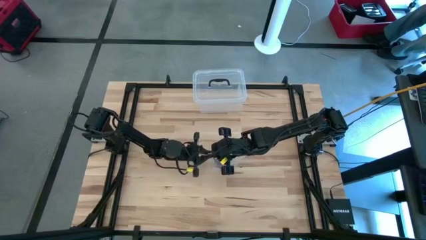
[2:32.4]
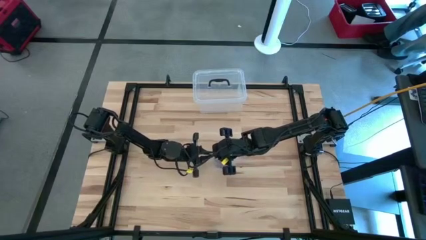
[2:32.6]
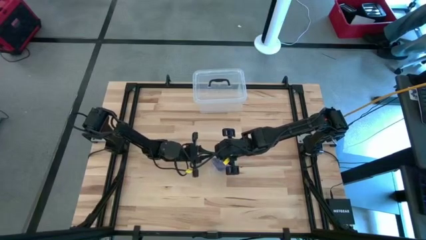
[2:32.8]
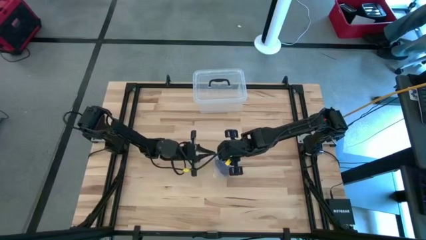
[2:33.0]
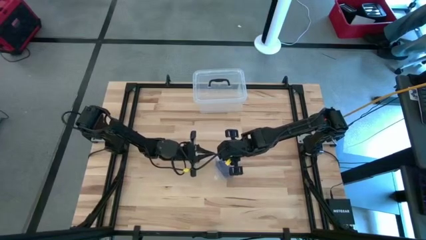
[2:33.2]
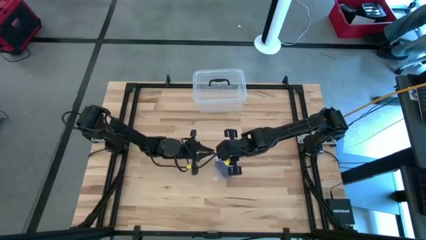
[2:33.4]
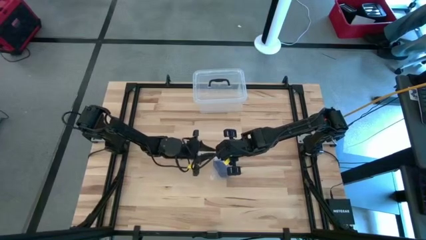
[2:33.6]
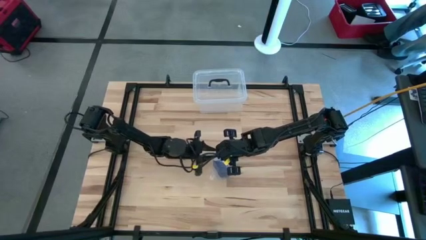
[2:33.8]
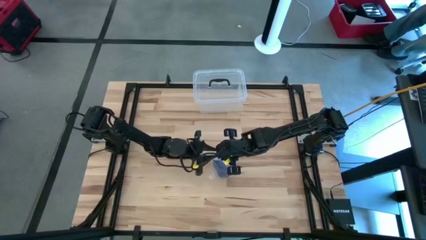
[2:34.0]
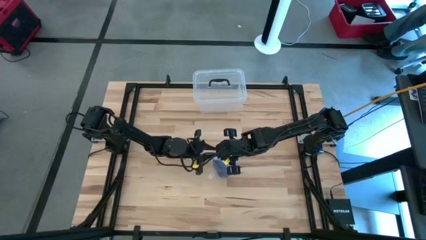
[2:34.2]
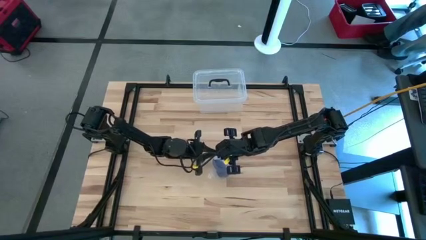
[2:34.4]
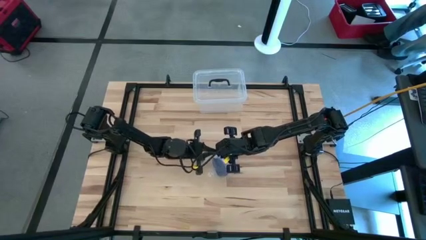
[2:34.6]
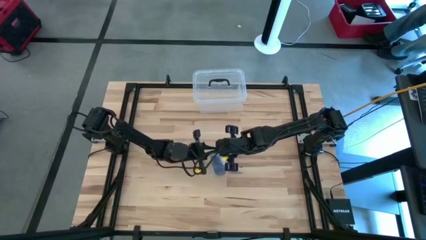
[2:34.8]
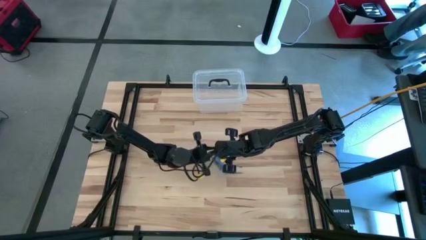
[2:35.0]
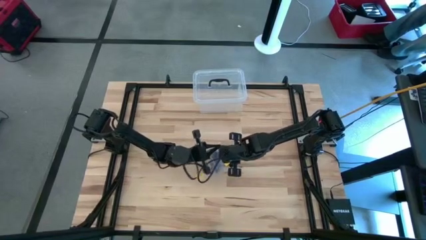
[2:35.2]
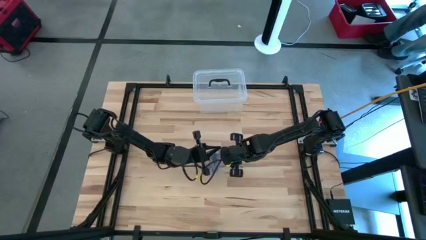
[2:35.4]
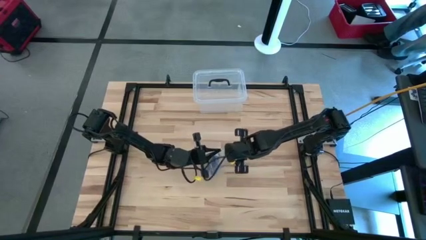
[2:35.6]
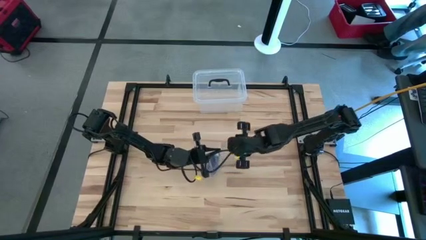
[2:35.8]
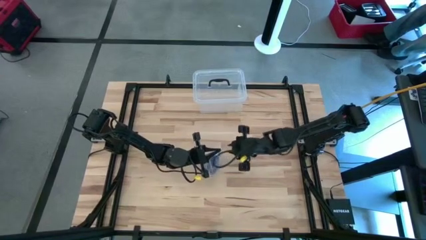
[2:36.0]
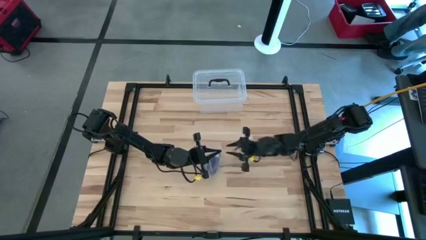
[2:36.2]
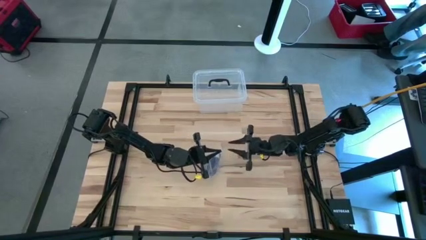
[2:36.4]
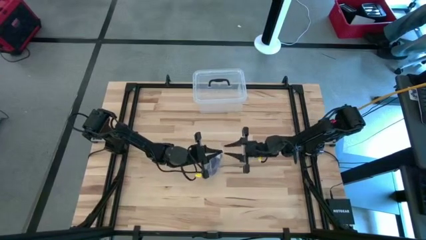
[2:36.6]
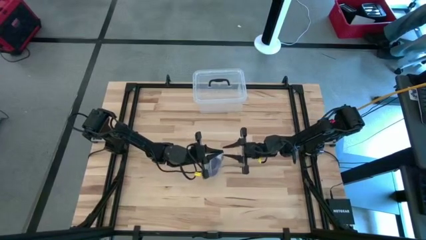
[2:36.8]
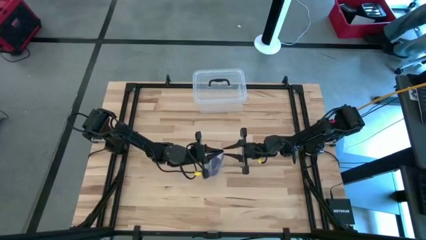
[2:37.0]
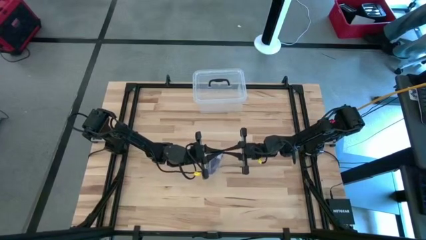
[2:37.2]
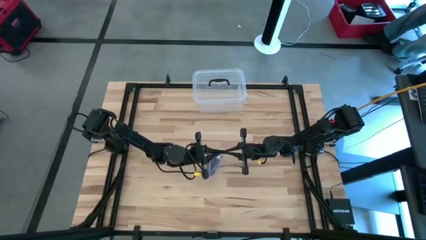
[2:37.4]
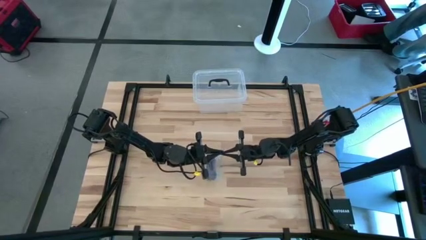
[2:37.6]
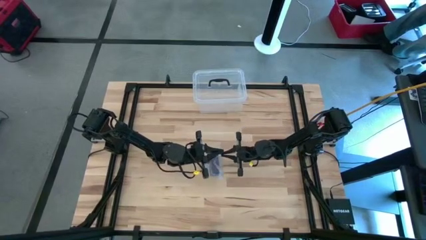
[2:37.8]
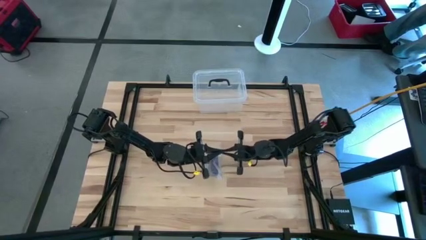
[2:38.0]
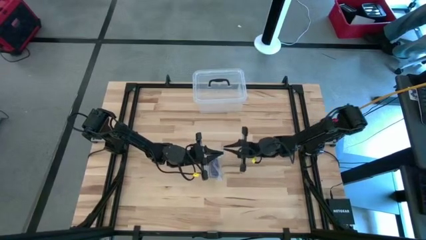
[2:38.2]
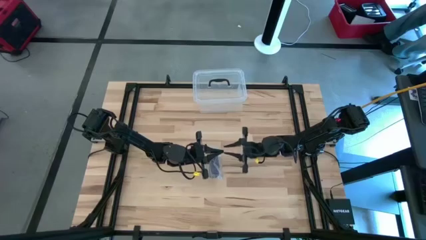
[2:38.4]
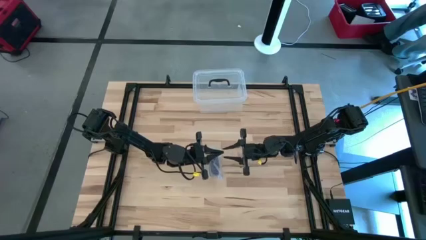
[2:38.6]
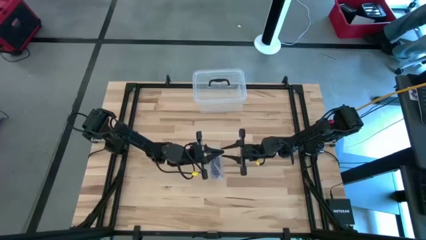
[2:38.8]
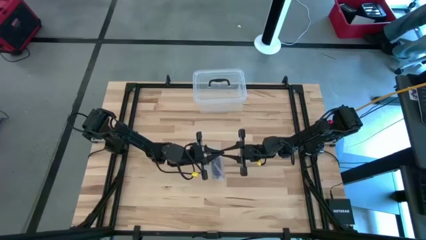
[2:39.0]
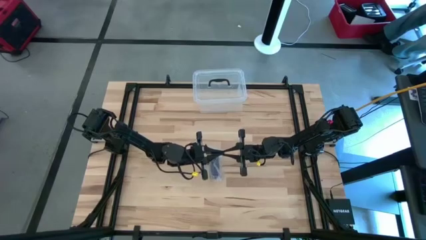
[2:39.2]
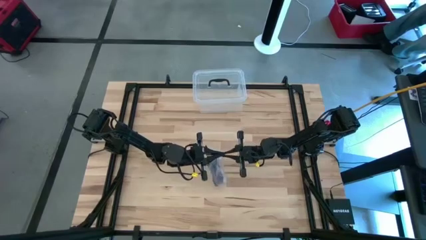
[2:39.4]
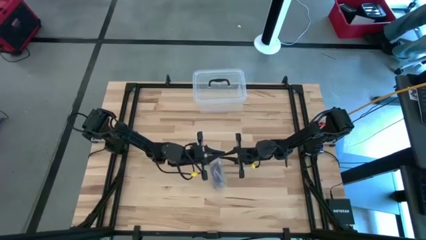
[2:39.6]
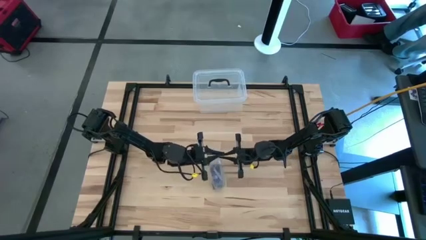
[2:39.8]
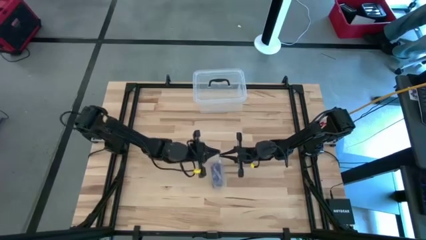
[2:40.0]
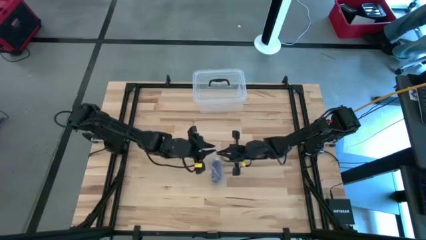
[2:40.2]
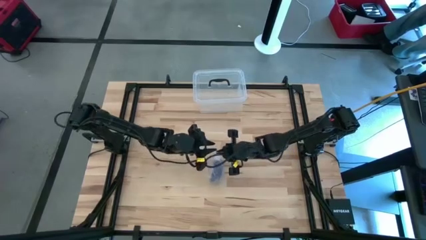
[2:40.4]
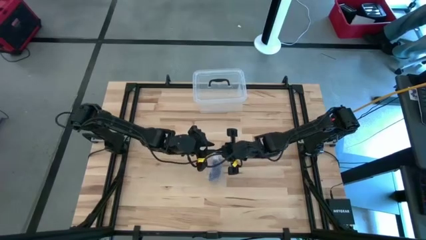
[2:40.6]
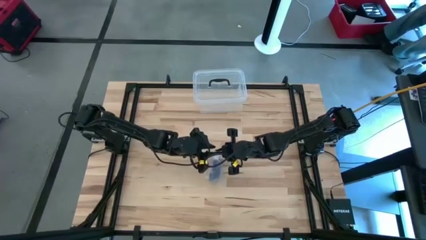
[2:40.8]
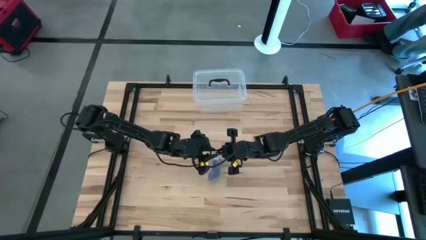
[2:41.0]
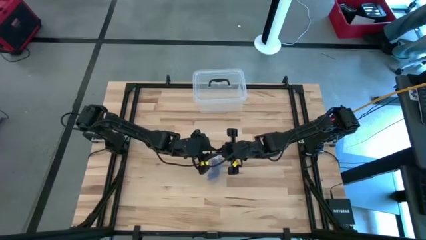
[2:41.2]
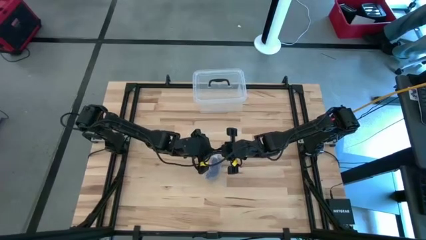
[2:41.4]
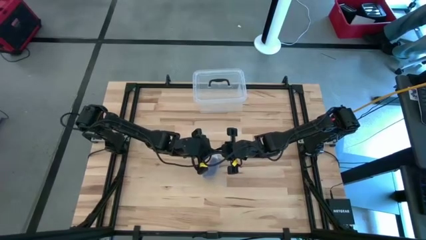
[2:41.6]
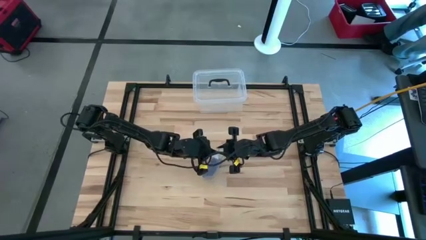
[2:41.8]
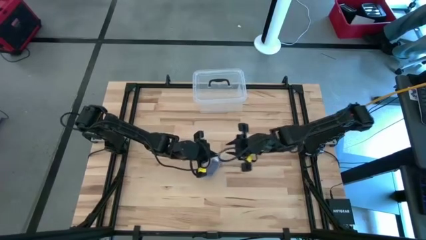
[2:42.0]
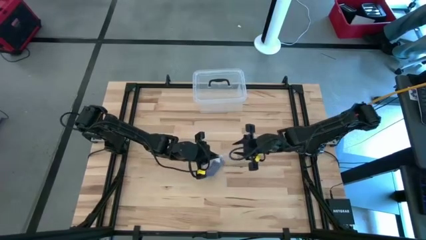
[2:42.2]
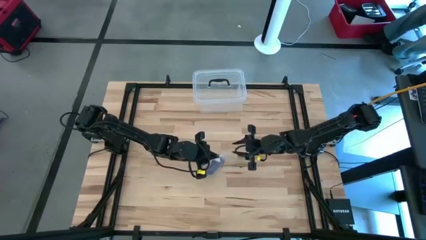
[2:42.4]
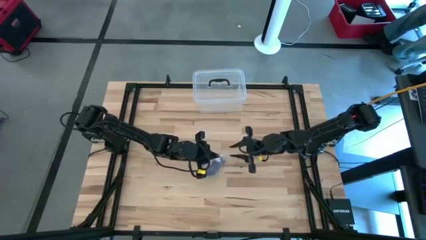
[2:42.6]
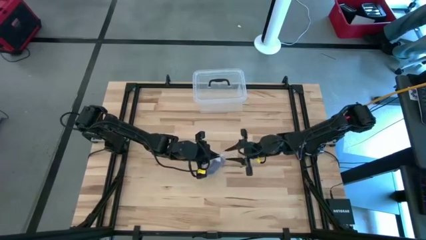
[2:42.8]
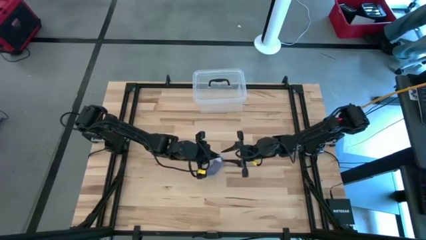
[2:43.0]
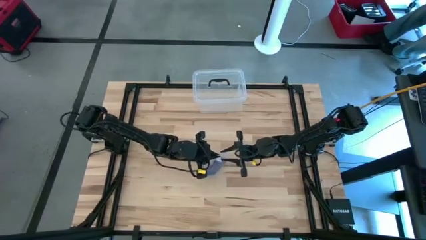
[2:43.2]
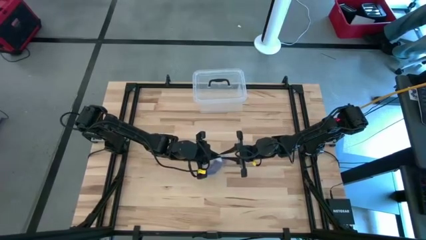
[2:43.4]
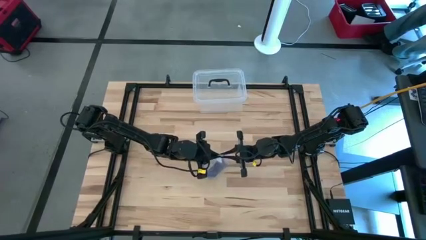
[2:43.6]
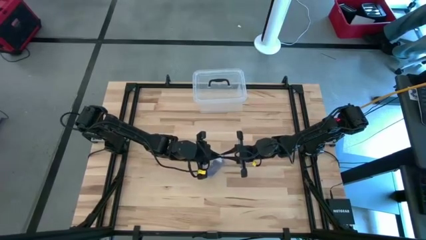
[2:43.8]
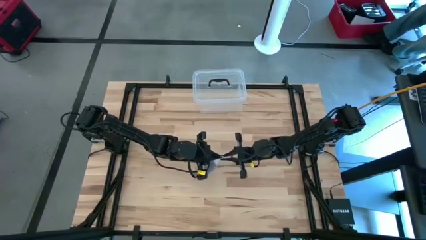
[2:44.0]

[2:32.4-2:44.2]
Task: Roll bandage
Close the transparent zip bag

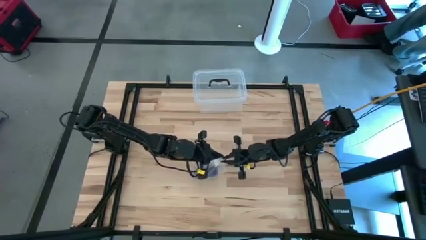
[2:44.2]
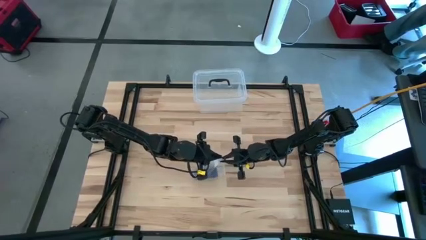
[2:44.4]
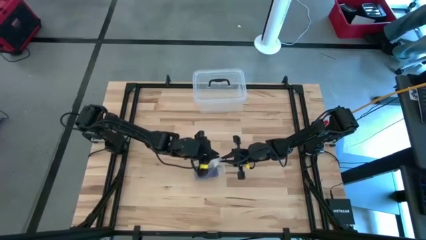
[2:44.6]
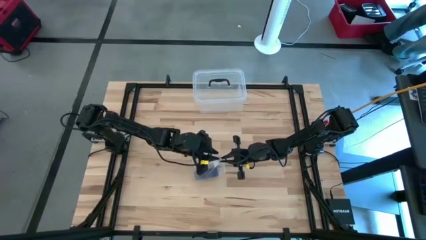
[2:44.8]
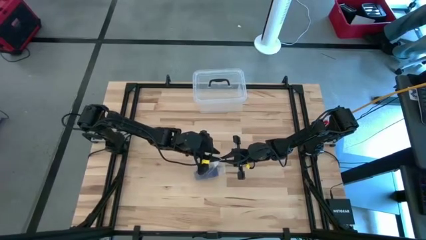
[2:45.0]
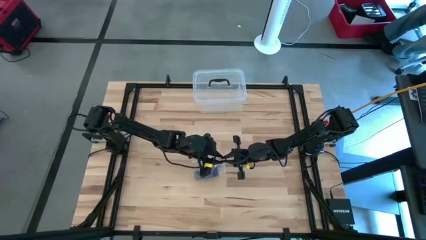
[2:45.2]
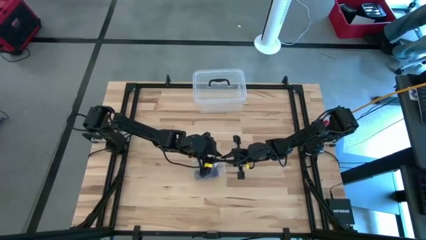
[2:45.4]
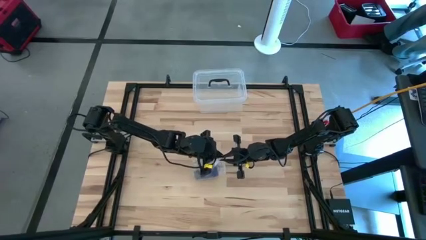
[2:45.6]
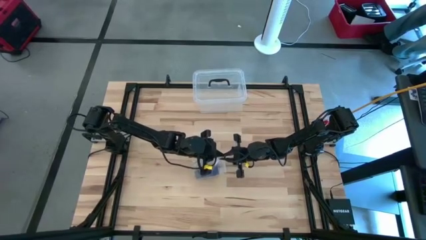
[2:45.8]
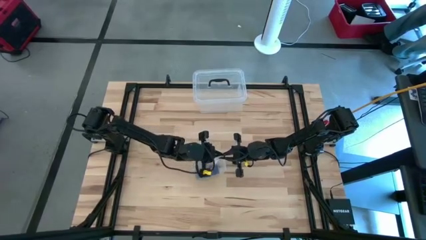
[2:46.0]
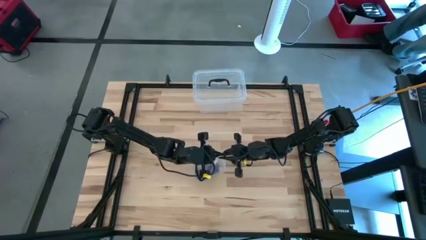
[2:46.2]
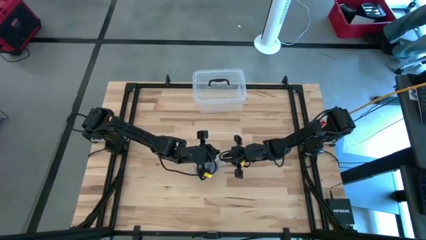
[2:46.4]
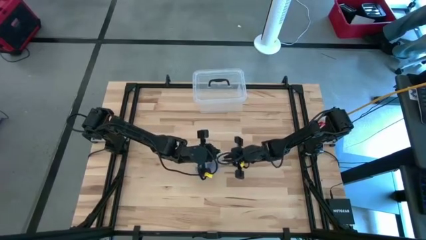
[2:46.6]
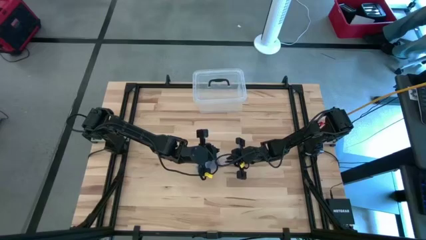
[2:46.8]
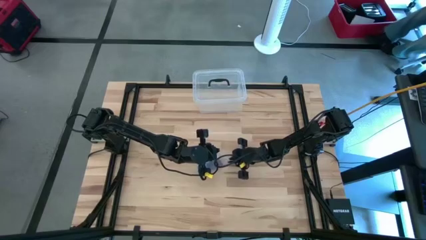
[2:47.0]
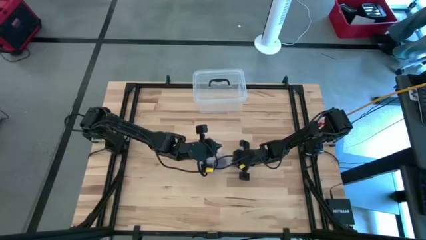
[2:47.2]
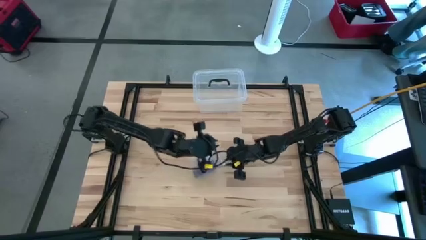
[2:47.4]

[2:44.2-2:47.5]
Close the transparent zip bag
